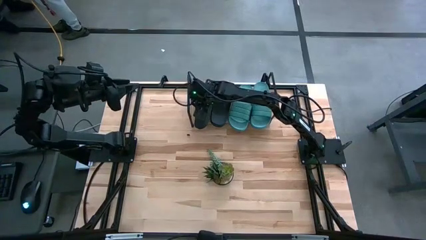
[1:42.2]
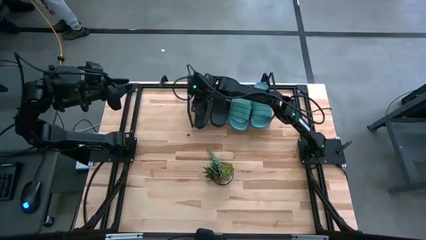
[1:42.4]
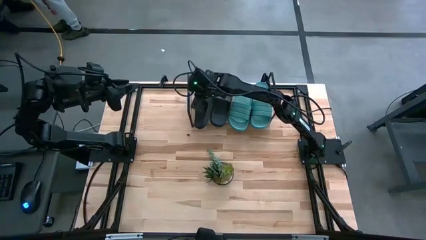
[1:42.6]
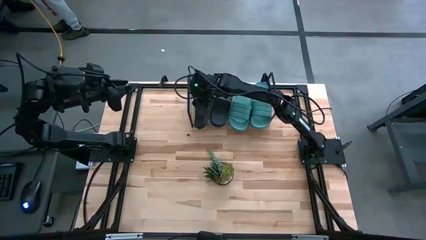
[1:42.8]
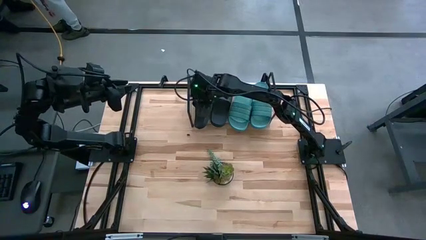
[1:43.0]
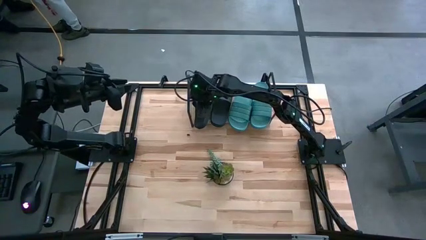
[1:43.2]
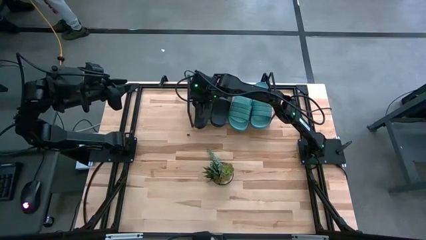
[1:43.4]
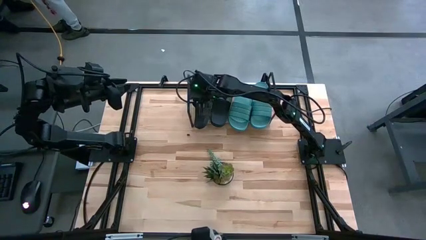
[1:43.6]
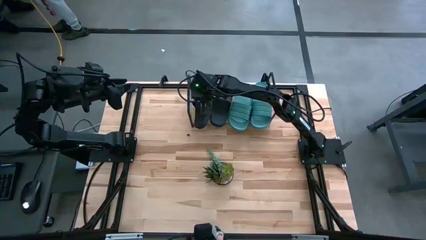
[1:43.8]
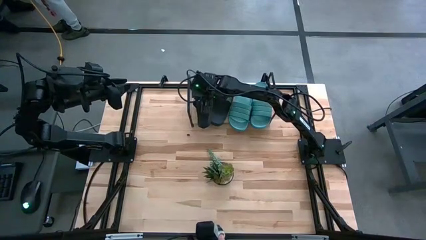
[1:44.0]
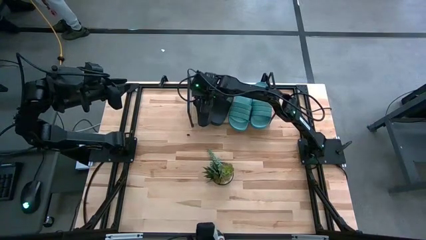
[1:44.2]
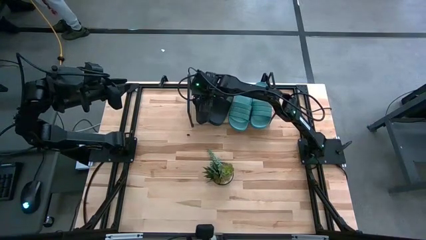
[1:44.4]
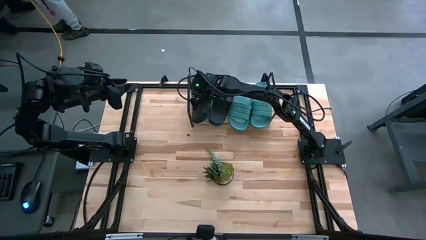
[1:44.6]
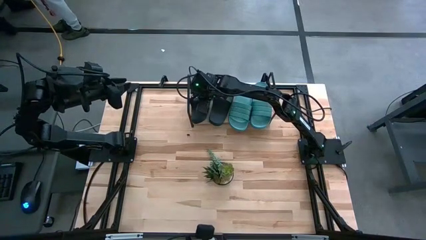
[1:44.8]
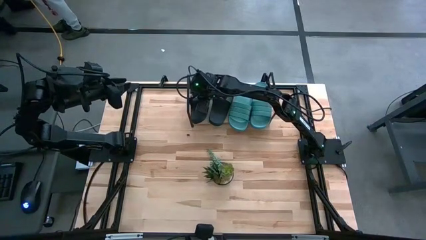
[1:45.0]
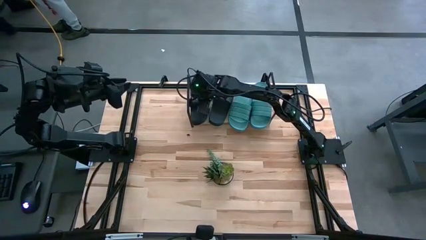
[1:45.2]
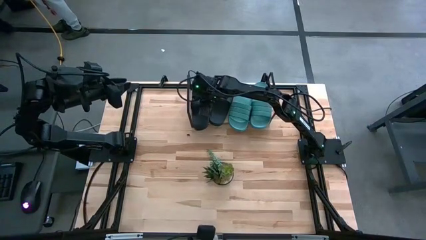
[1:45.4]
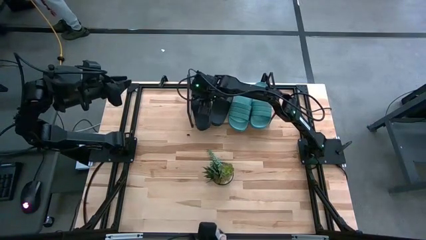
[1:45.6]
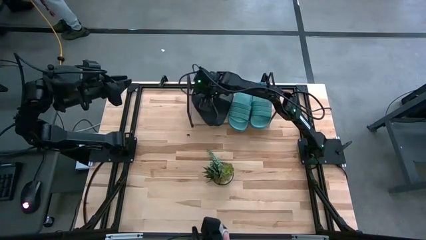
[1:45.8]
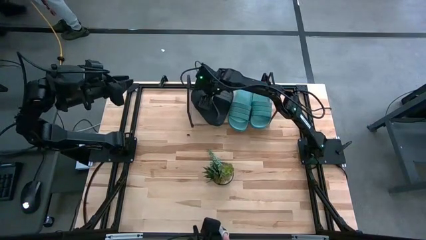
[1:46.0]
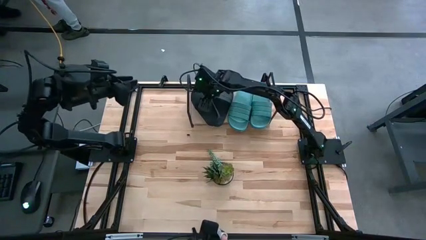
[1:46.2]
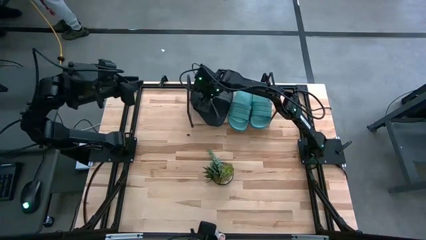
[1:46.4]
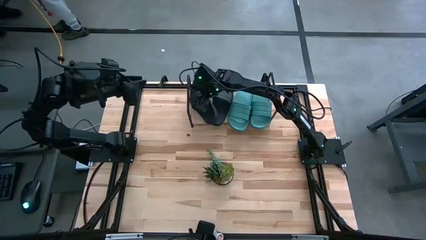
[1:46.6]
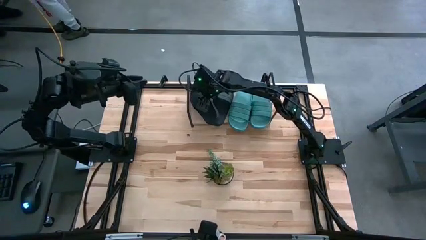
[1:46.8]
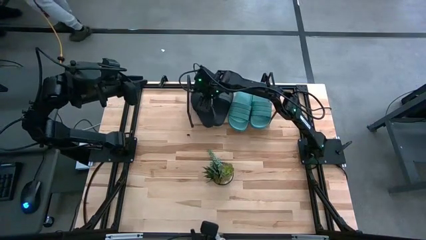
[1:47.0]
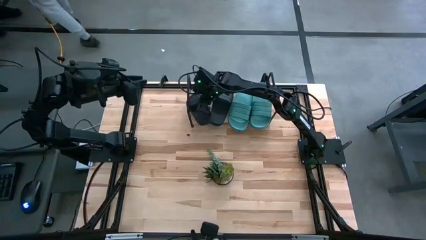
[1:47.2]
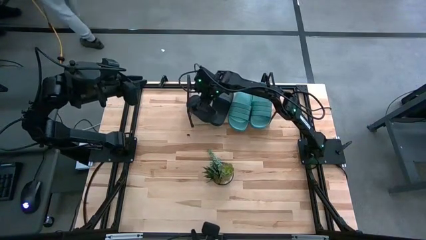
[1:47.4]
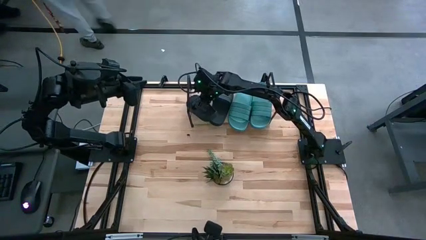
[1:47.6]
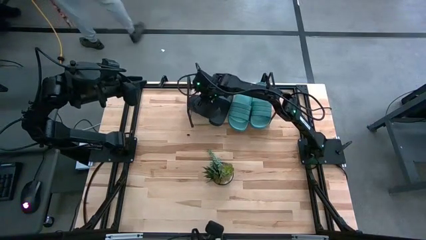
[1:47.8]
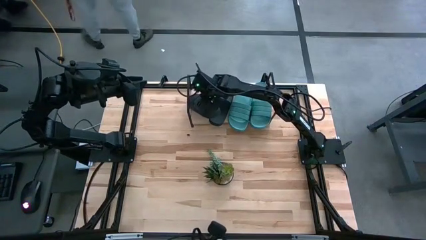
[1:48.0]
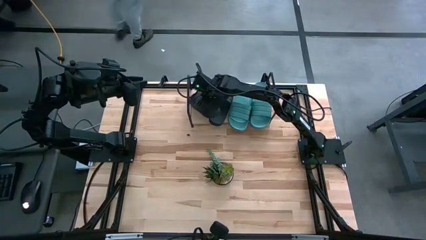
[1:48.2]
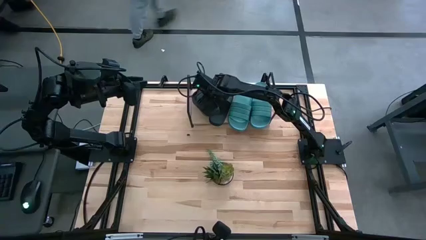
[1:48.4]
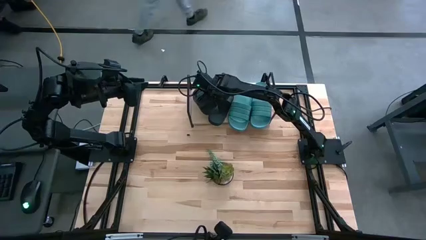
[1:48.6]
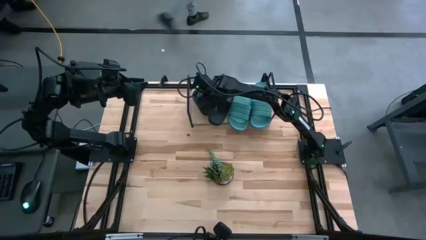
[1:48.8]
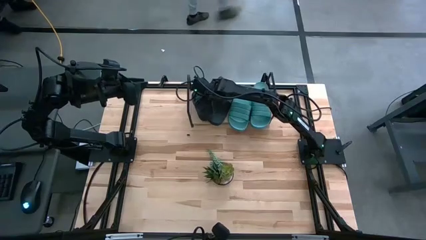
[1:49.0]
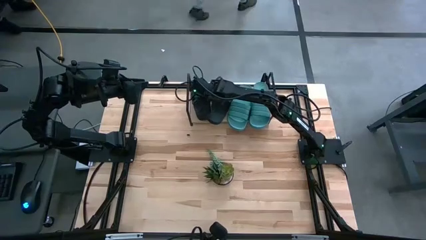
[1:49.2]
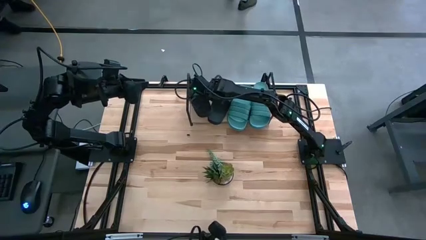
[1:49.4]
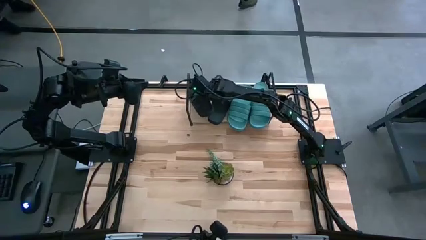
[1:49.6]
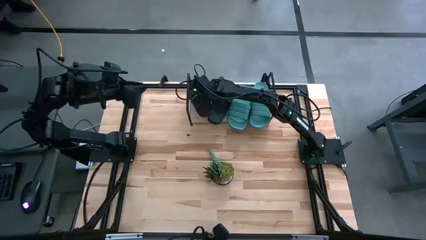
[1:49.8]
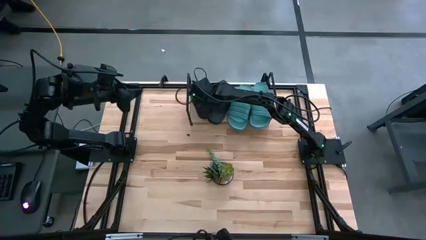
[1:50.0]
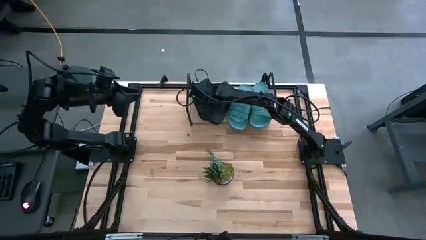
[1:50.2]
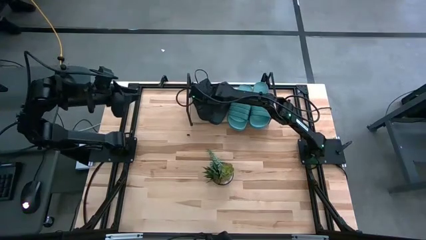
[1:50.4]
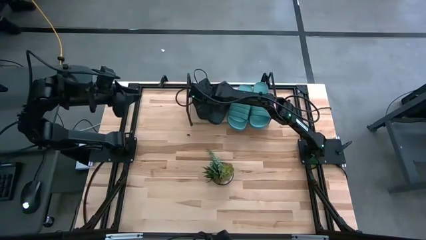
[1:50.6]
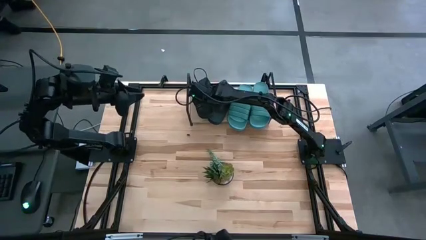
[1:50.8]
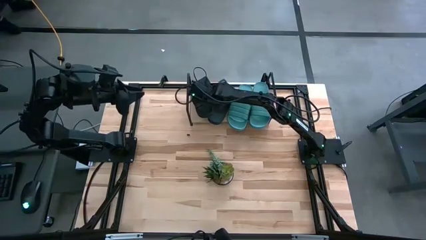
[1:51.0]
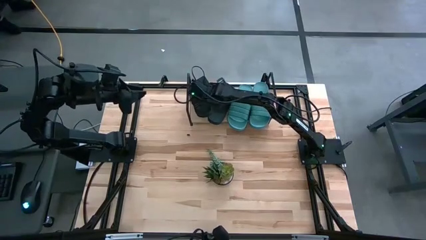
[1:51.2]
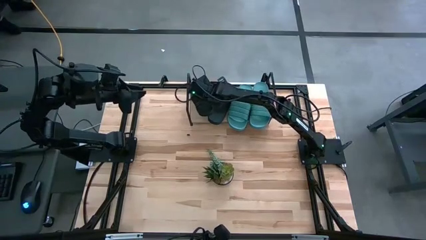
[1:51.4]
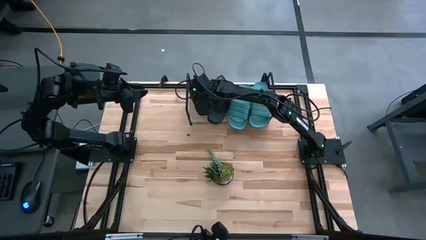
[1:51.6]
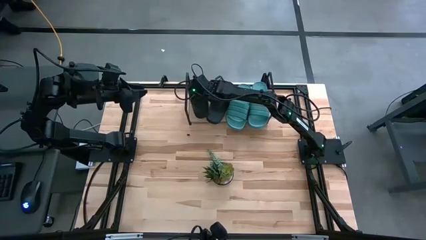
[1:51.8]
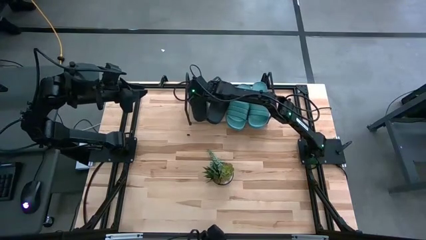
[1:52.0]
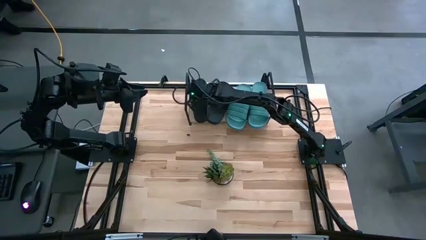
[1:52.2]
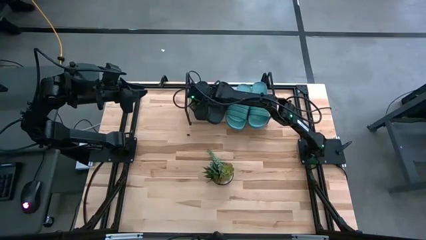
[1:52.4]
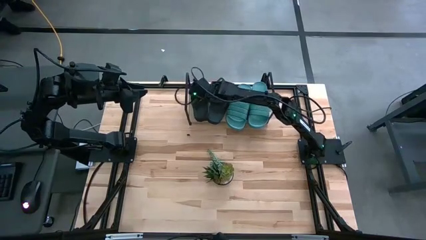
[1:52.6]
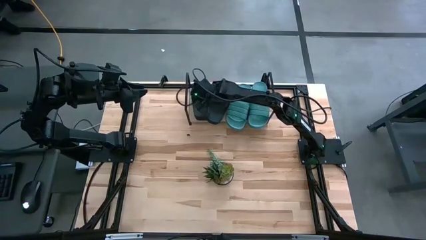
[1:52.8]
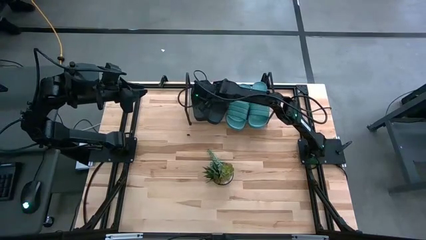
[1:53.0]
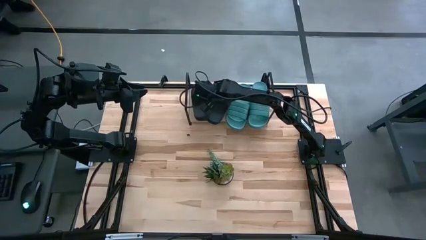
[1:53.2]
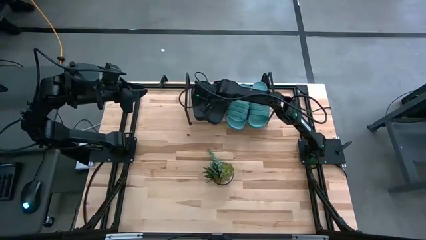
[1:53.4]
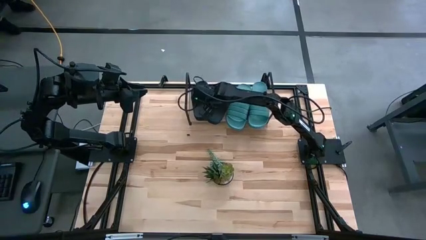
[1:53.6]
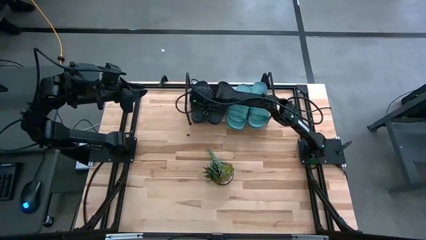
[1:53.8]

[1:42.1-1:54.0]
Task: Pick and place slides into the shelf
Put the black slipper on the shelf

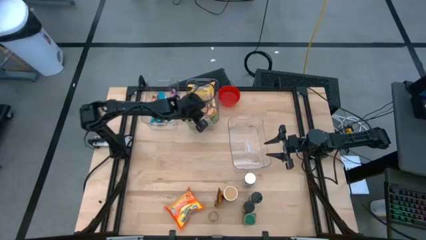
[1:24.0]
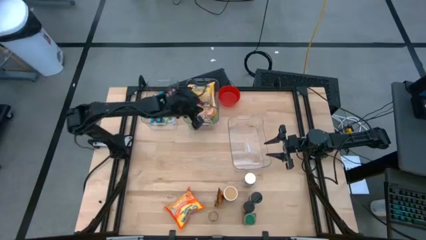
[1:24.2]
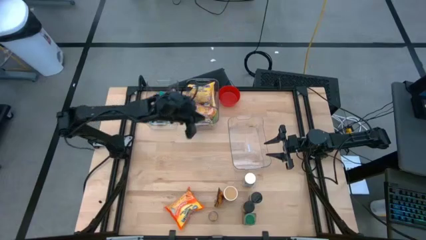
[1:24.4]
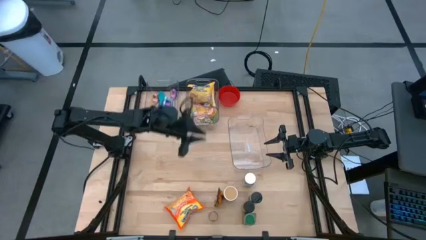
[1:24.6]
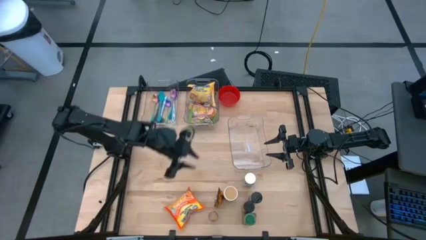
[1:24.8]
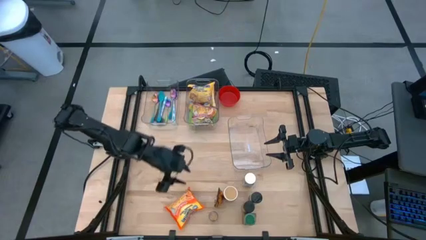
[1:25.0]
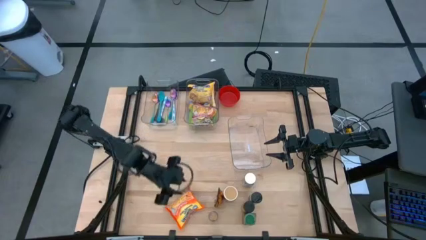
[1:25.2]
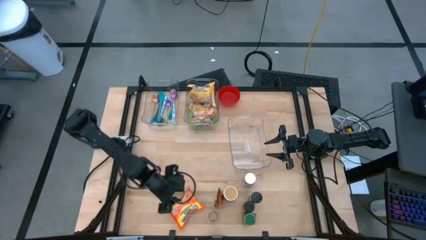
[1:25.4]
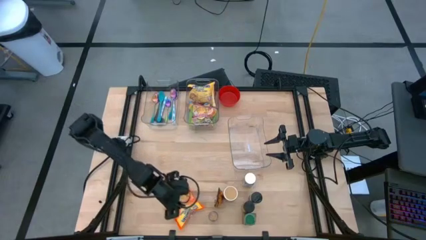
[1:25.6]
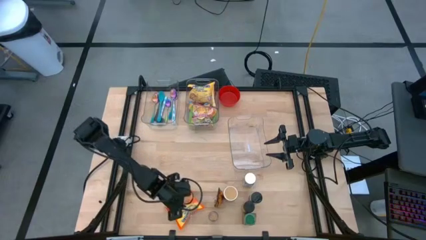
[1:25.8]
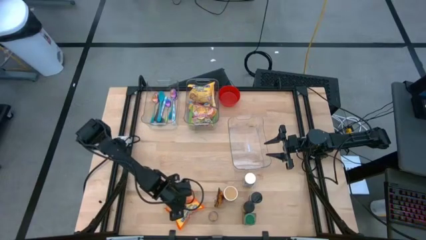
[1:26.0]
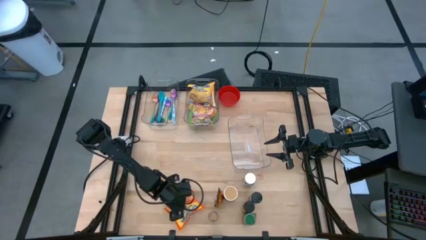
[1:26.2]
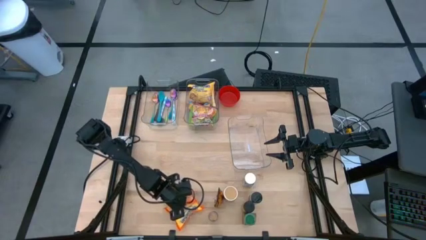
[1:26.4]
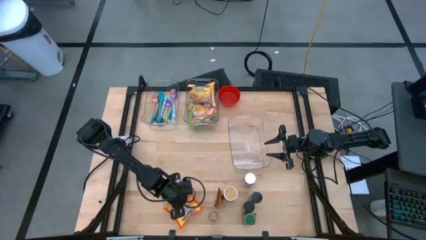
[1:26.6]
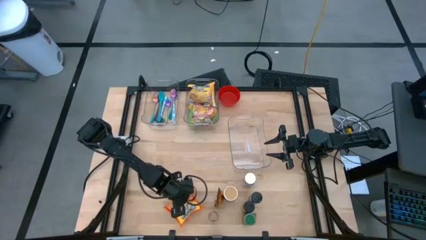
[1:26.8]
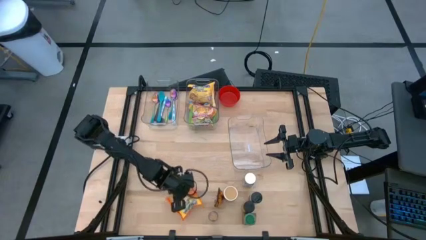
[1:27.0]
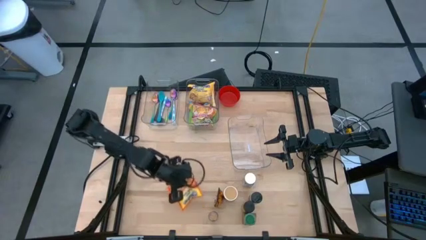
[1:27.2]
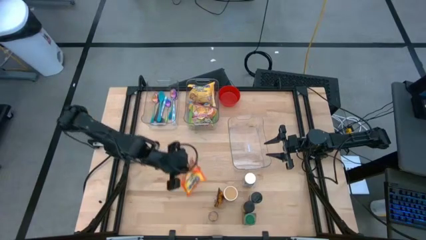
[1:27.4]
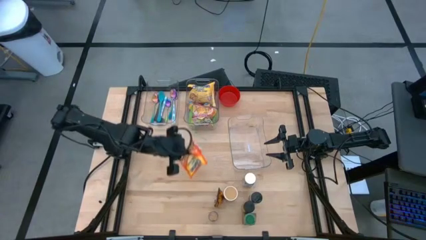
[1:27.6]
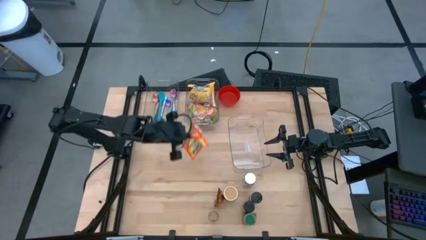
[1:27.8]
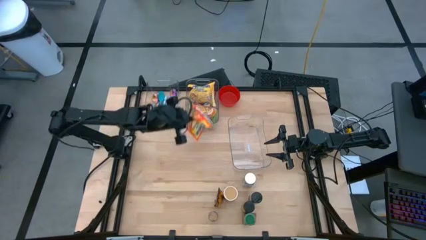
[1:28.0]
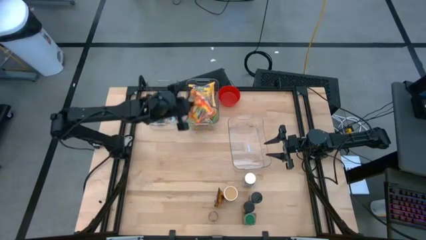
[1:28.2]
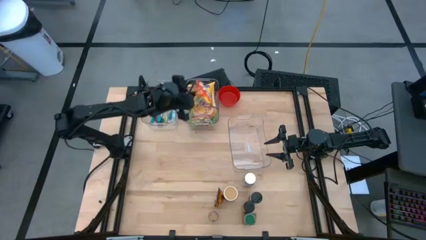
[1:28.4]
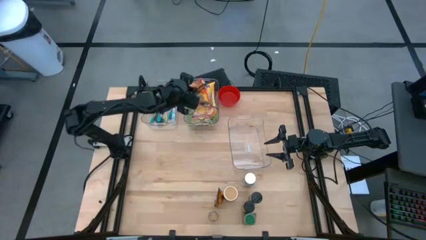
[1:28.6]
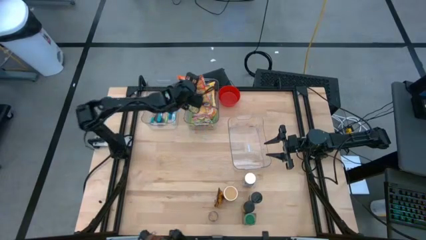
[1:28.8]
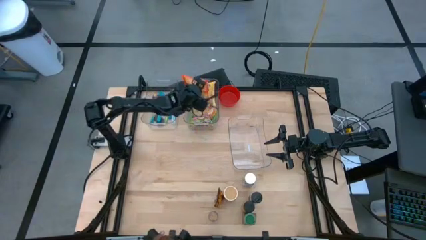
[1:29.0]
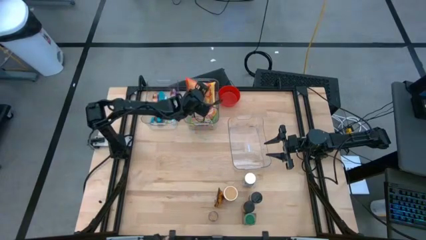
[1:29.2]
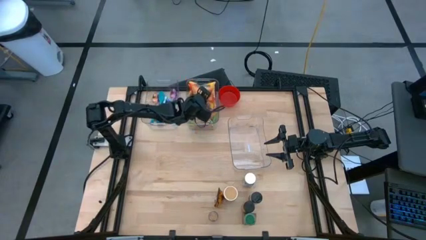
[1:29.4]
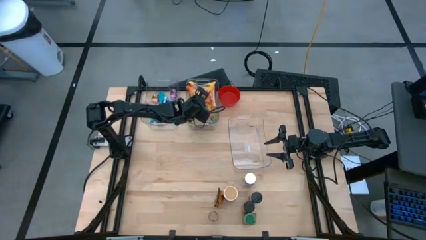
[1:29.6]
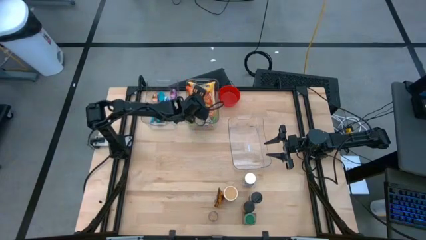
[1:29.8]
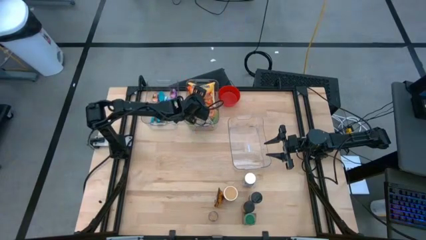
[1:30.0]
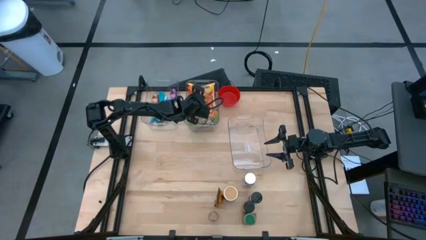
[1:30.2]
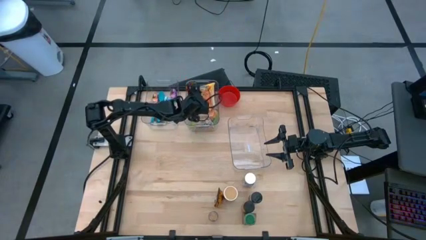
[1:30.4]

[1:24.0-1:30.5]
Task: Pick & Place Food Item
Put the orange noodle pack into the top right transparent bin
